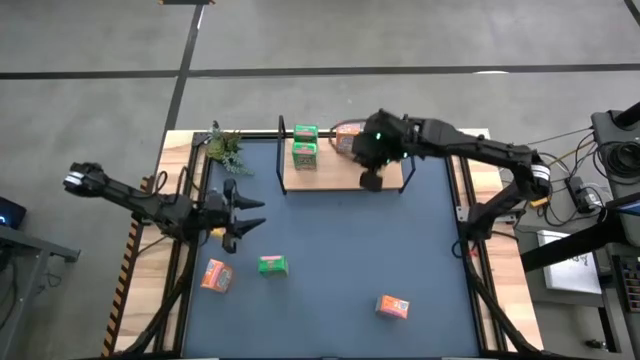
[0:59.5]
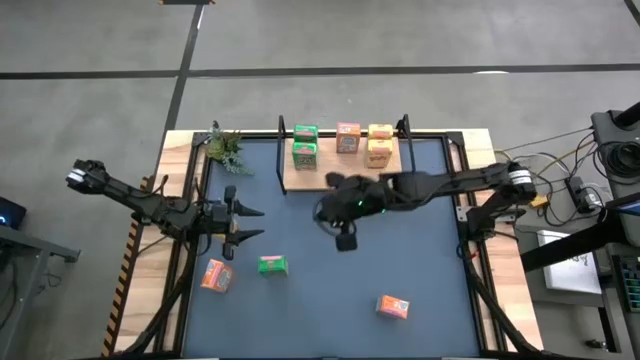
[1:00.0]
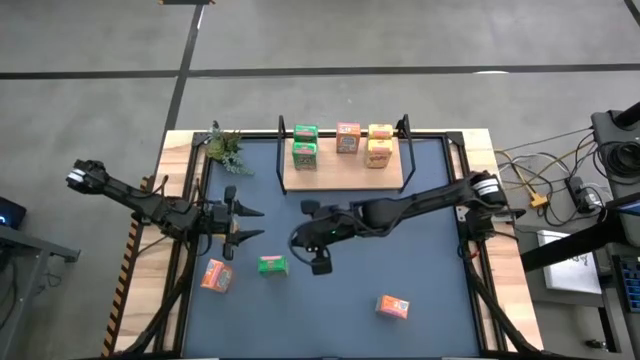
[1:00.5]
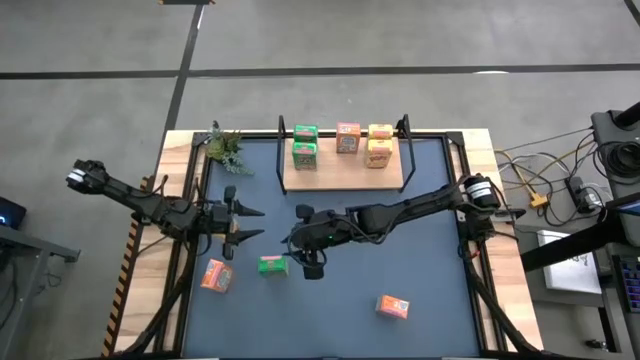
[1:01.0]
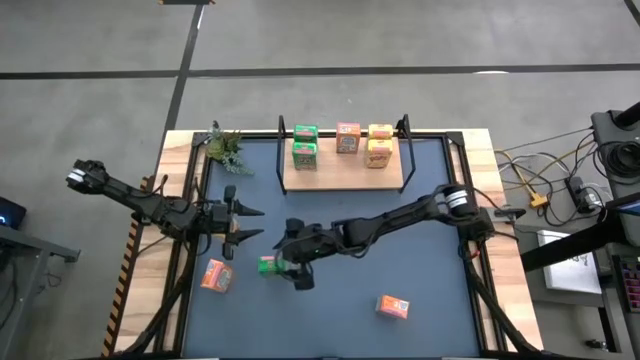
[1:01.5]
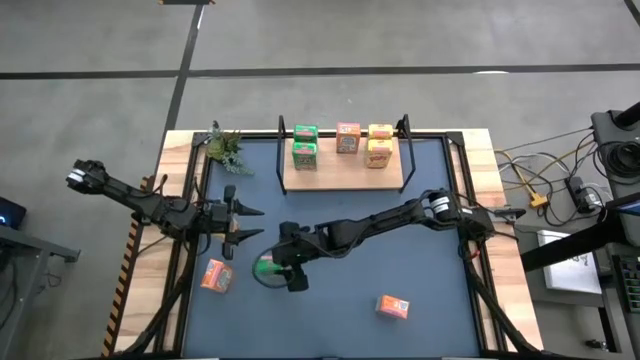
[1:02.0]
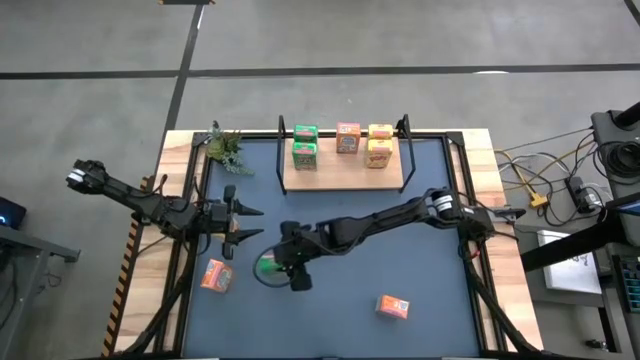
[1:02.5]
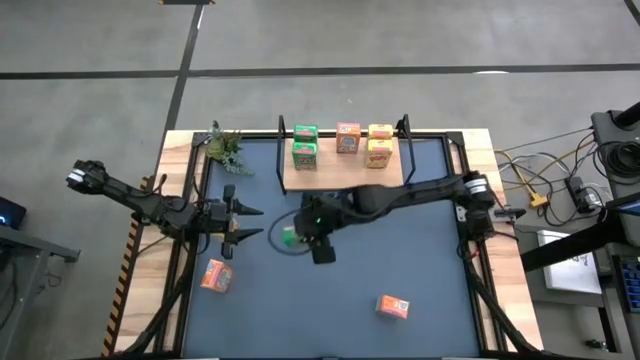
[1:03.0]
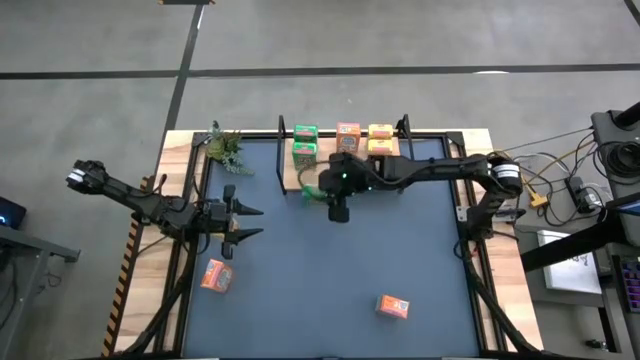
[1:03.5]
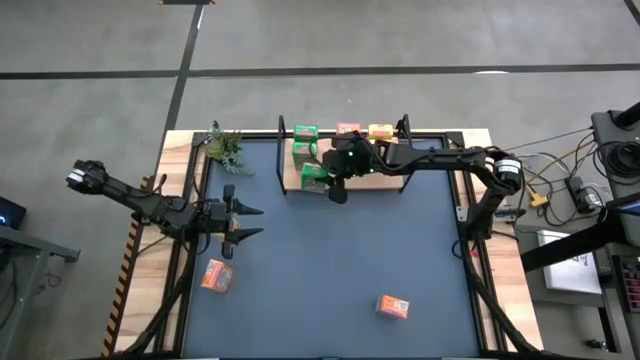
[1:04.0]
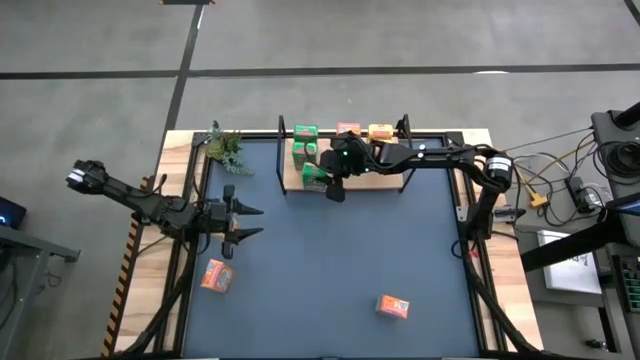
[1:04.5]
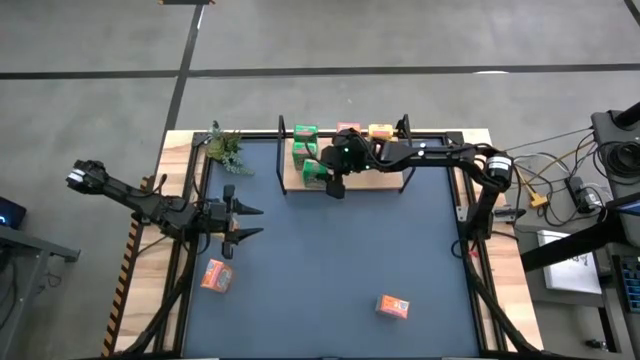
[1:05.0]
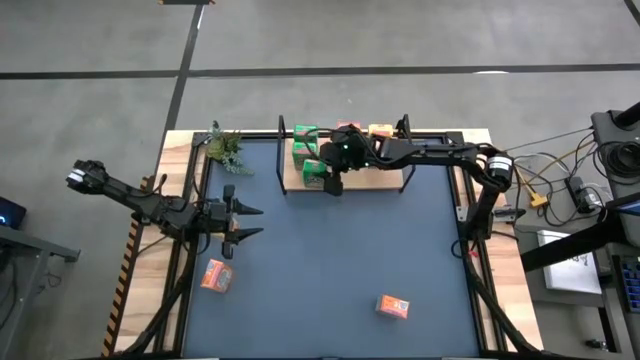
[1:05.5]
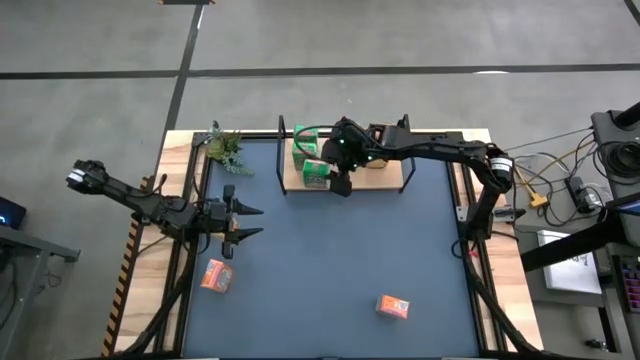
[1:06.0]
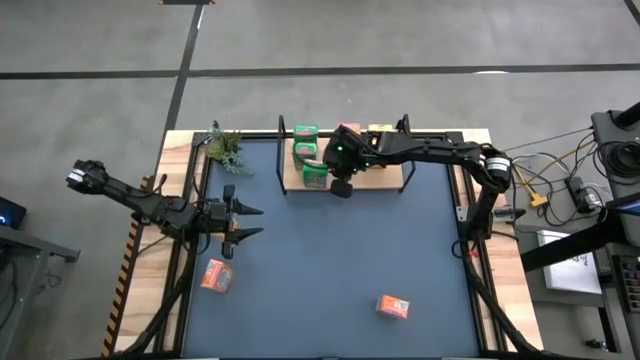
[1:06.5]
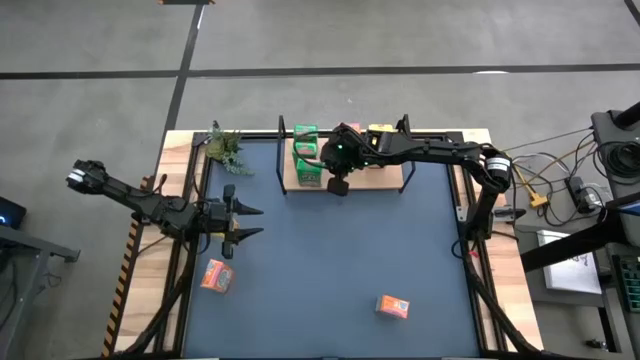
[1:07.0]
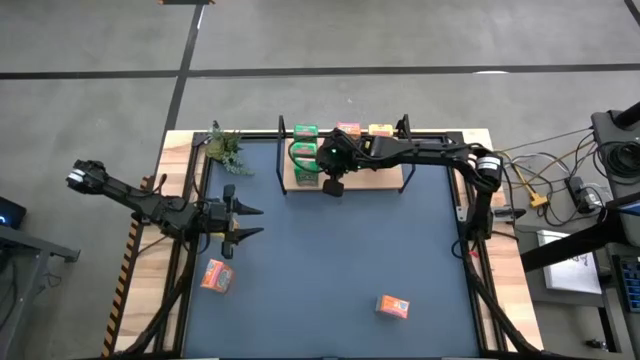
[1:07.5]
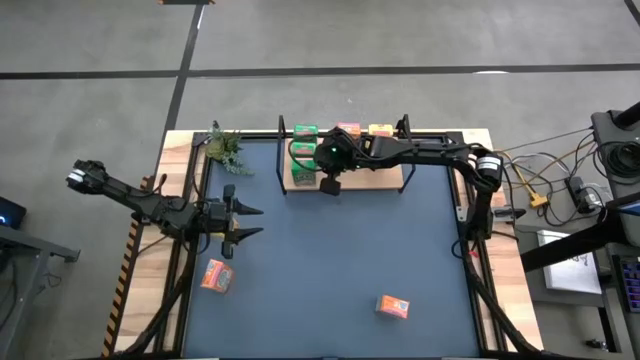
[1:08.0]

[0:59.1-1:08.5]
Task: Stack cereal on shelf
Stack the green cereal box on the shelf

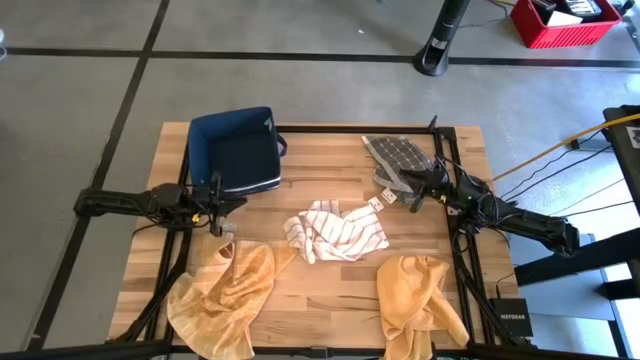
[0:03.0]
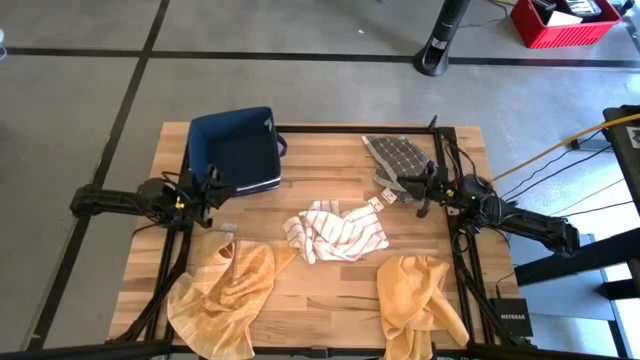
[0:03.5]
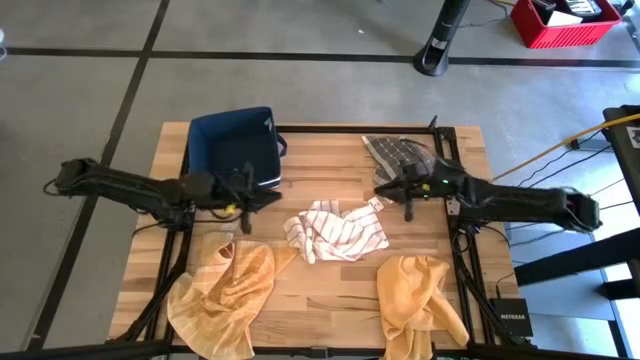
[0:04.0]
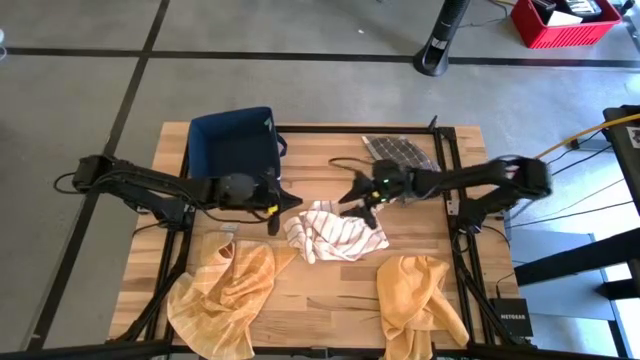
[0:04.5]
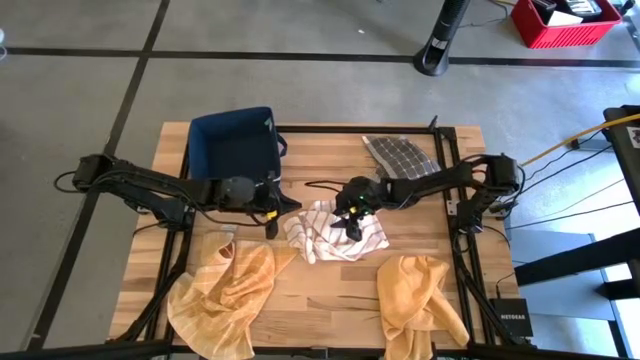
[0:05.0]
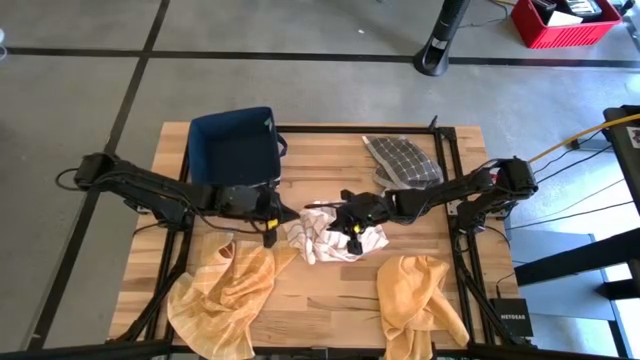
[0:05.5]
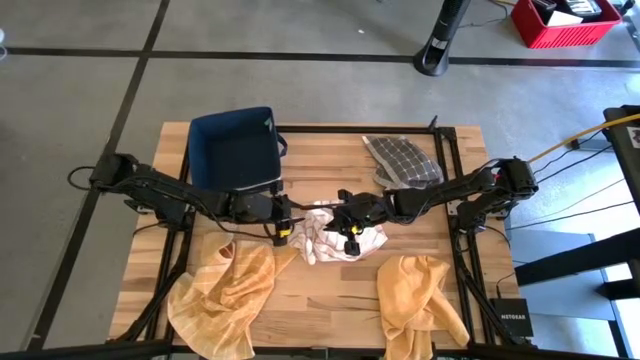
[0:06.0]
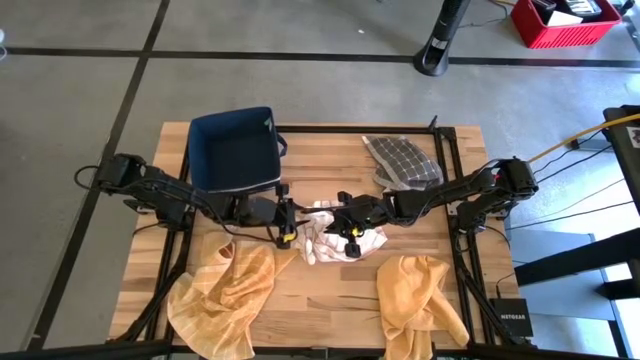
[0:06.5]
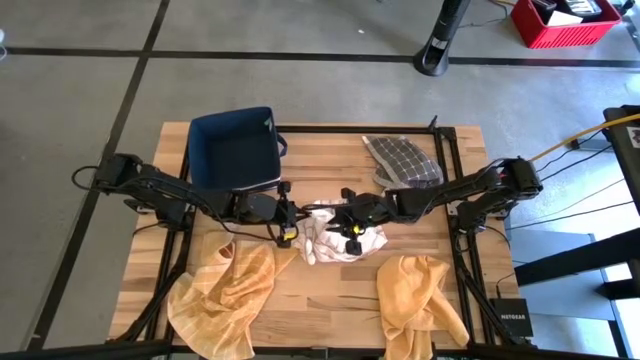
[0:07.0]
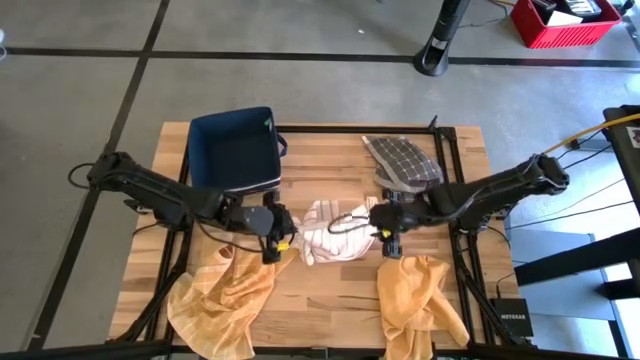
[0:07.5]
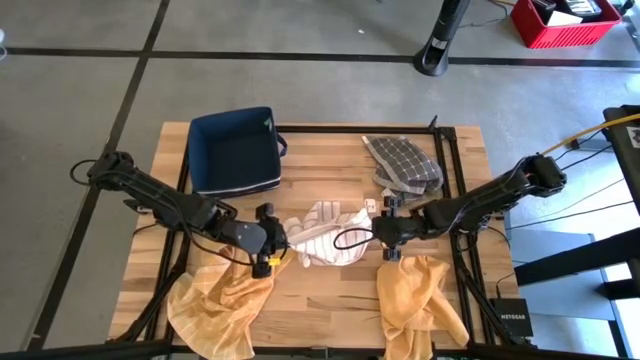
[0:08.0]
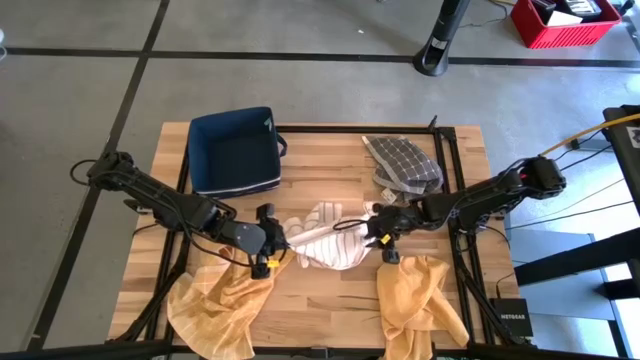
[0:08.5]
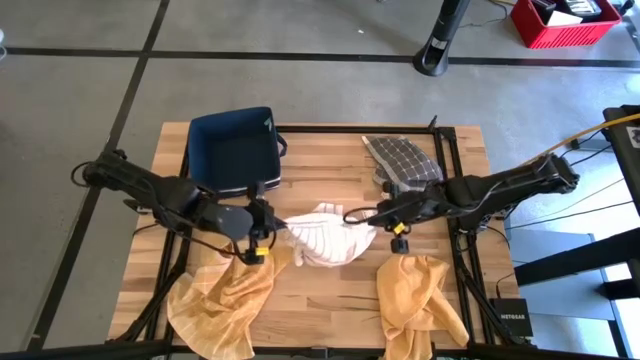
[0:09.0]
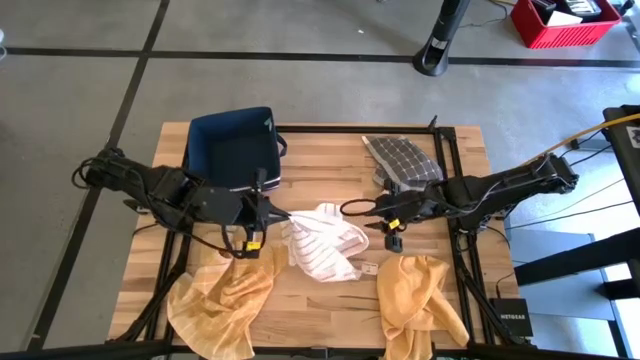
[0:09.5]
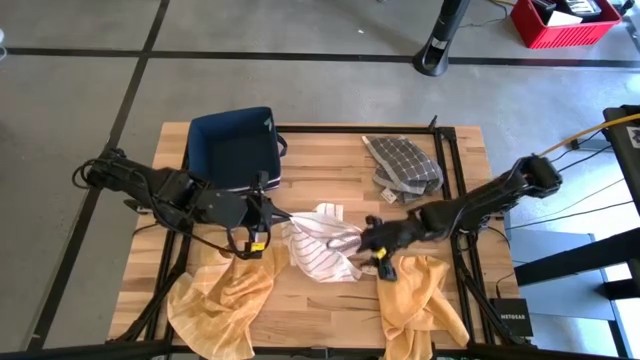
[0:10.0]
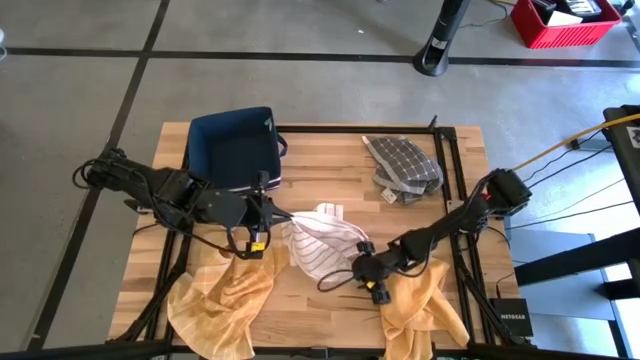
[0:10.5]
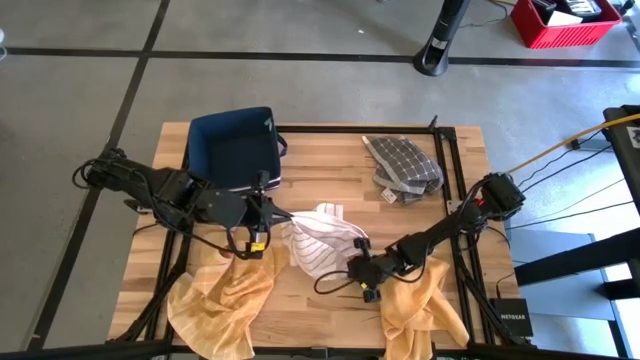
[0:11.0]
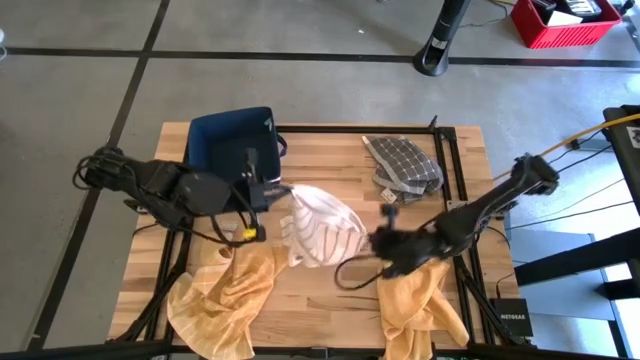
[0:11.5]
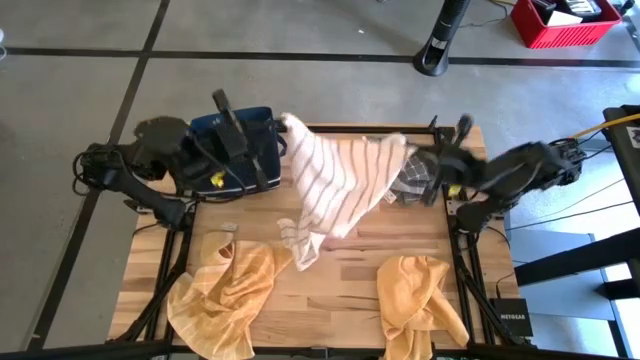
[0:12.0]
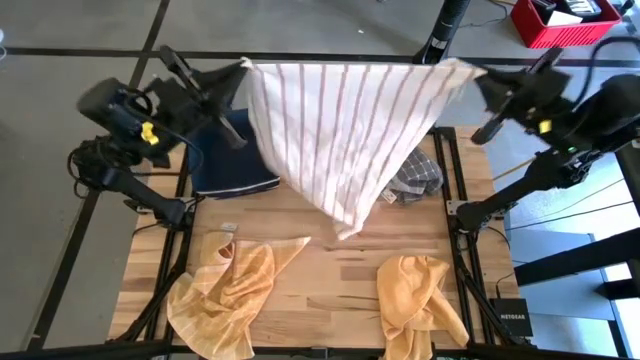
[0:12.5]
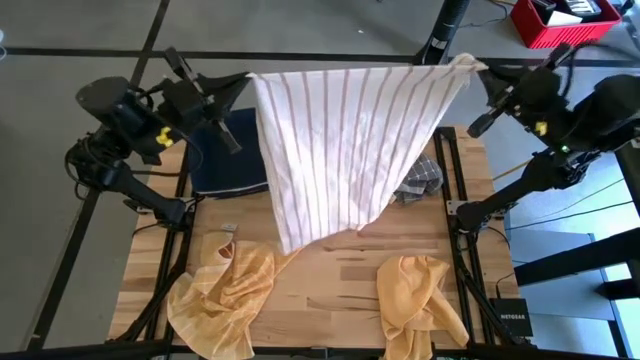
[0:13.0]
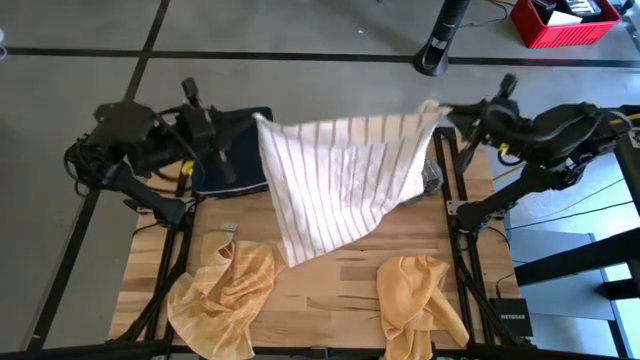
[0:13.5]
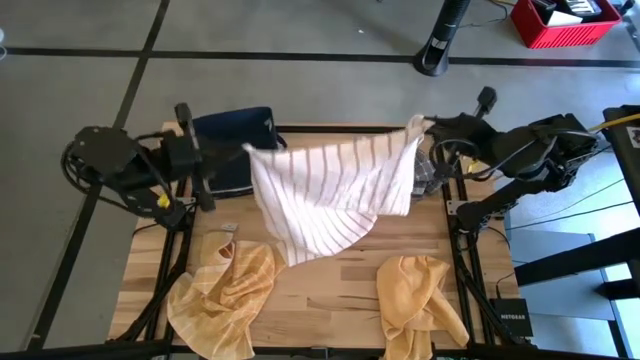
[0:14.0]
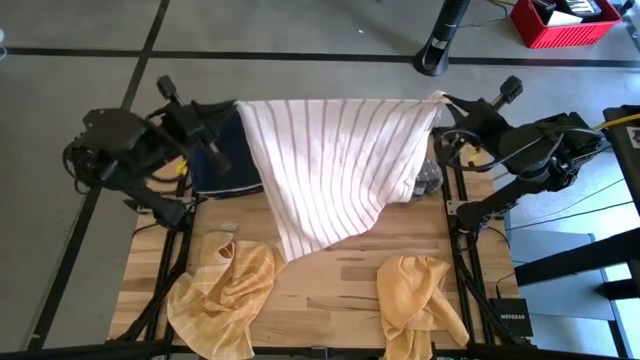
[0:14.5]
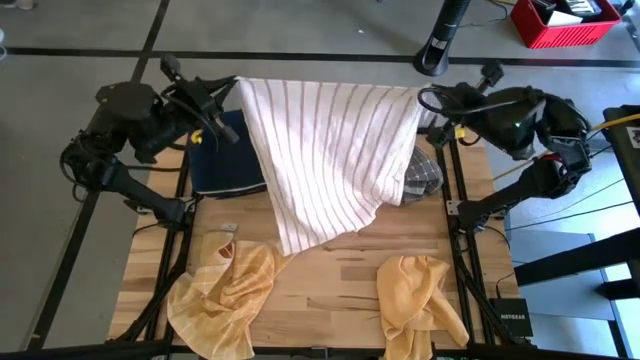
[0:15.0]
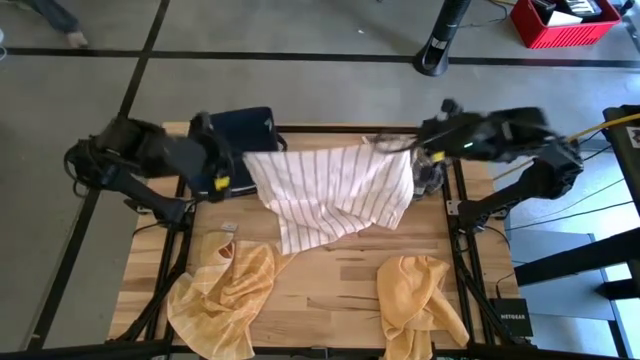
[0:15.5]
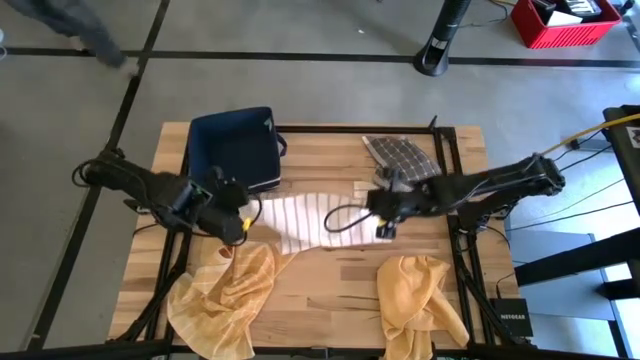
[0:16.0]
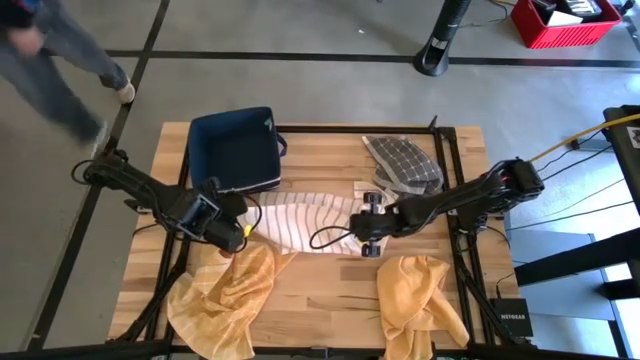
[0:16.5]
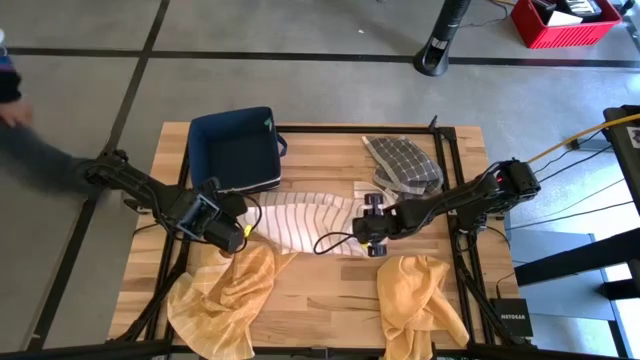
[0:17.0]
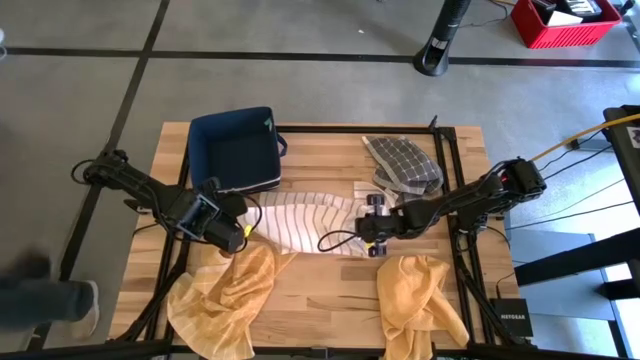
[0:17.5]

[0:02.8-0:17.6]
Task: Fold towel
Fold the white towel
